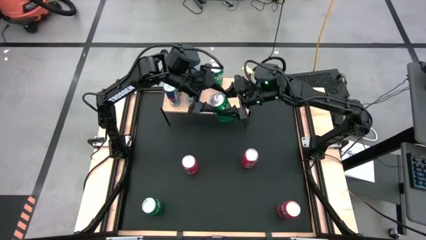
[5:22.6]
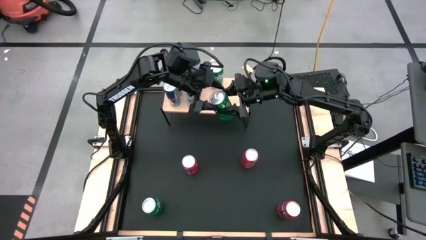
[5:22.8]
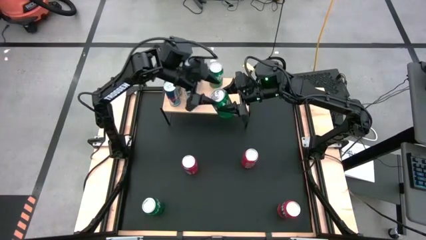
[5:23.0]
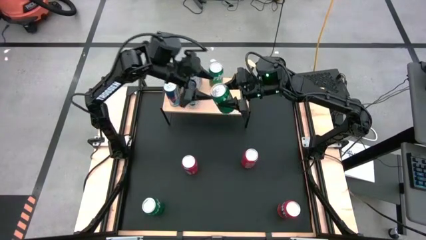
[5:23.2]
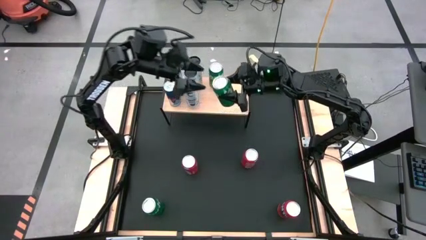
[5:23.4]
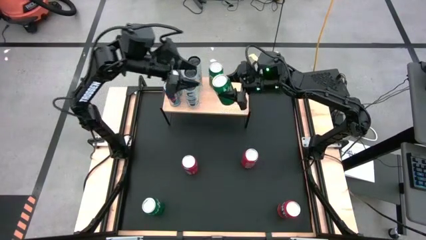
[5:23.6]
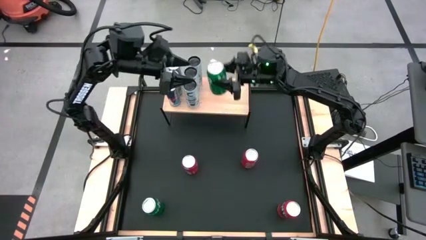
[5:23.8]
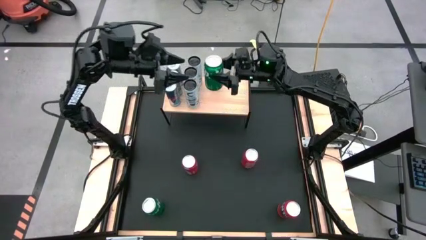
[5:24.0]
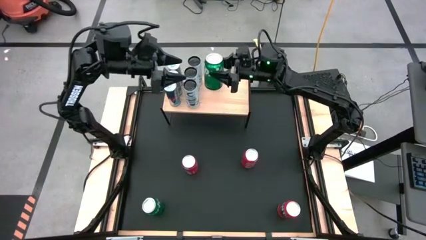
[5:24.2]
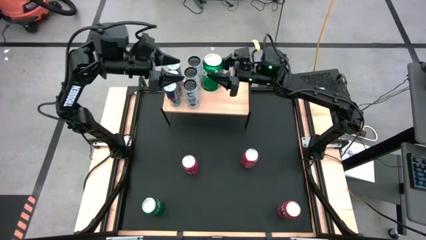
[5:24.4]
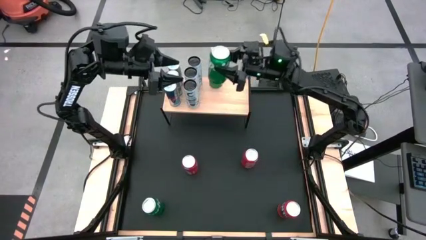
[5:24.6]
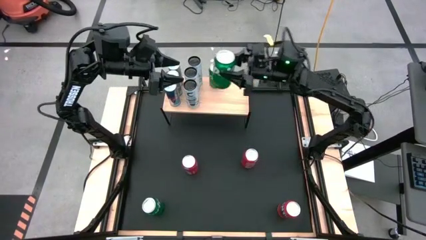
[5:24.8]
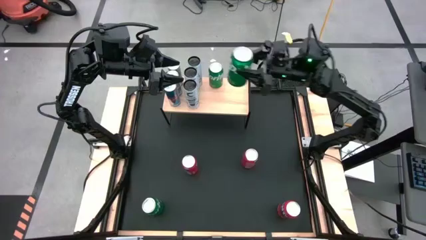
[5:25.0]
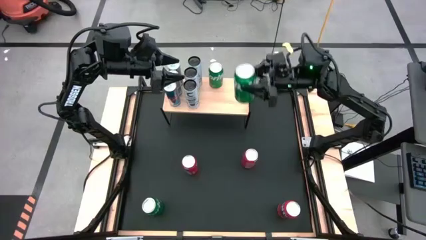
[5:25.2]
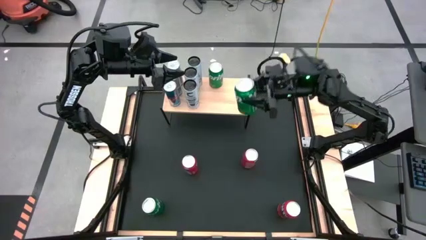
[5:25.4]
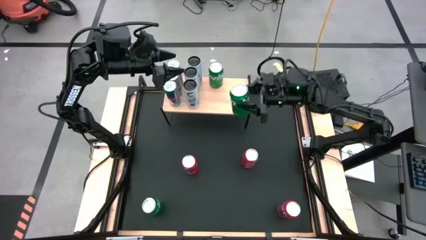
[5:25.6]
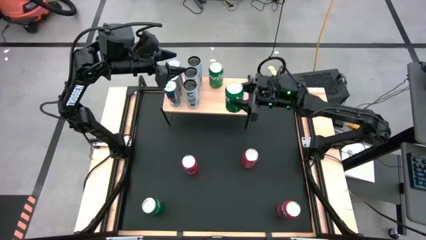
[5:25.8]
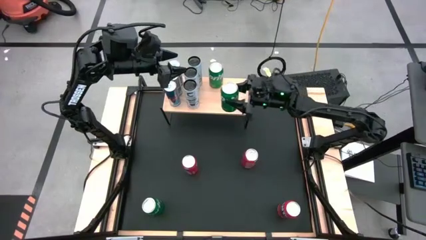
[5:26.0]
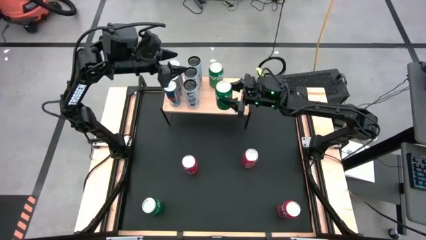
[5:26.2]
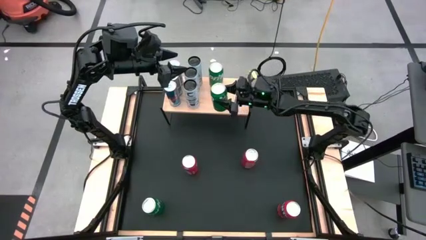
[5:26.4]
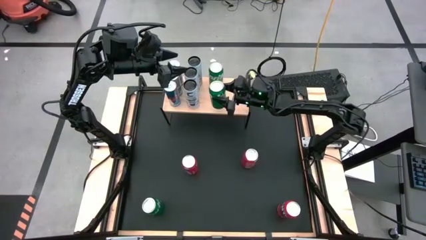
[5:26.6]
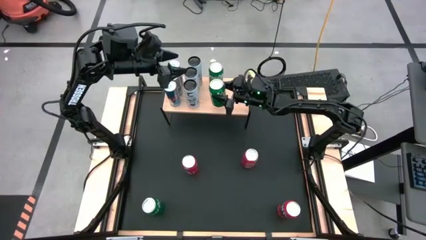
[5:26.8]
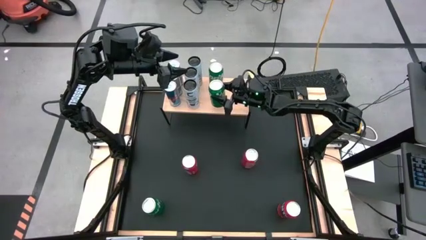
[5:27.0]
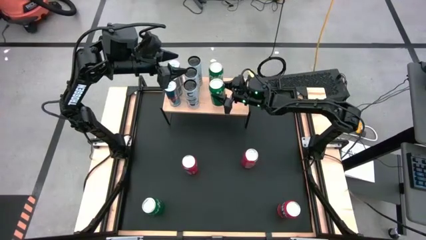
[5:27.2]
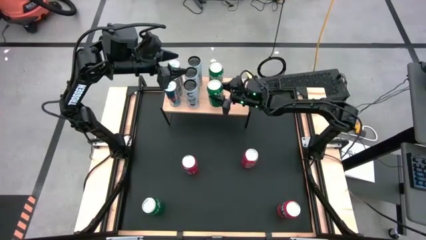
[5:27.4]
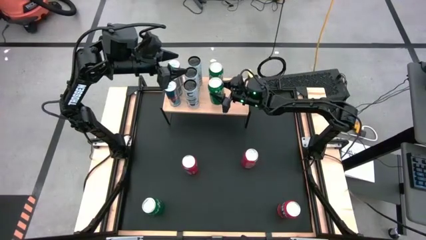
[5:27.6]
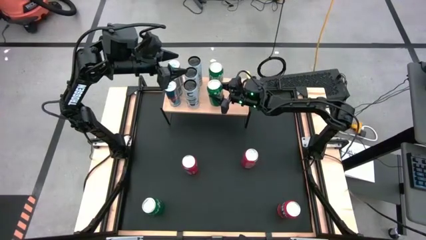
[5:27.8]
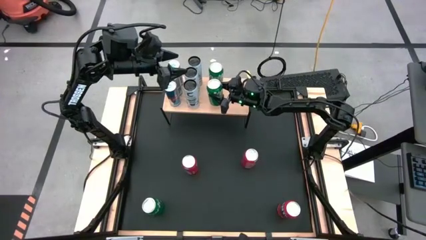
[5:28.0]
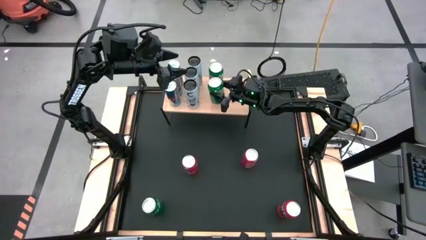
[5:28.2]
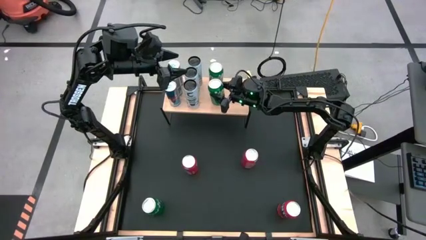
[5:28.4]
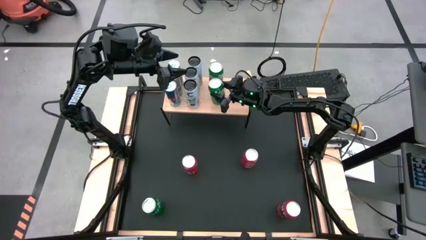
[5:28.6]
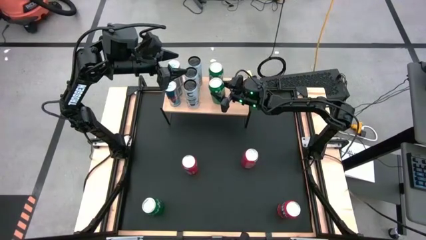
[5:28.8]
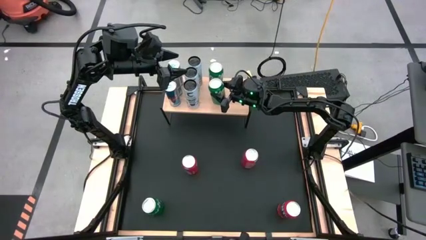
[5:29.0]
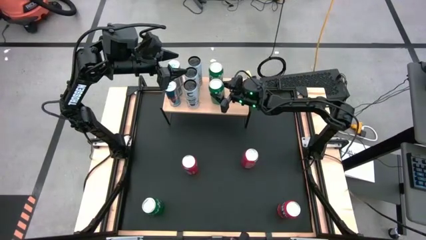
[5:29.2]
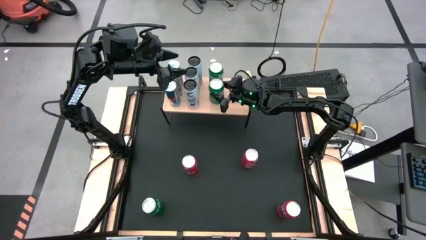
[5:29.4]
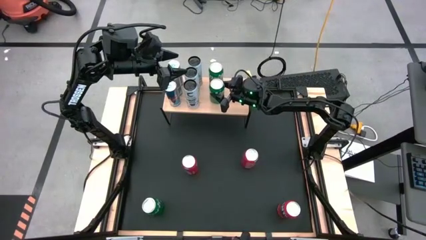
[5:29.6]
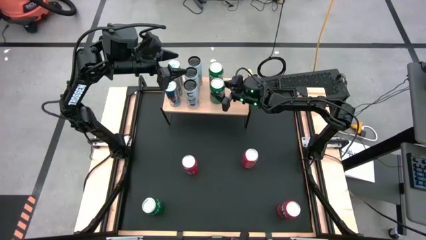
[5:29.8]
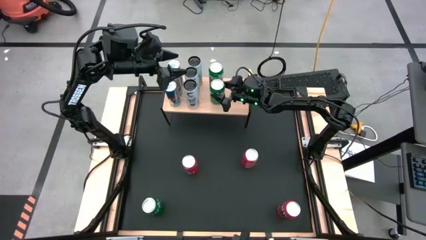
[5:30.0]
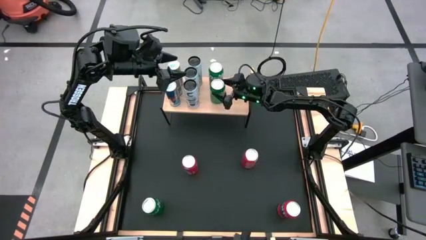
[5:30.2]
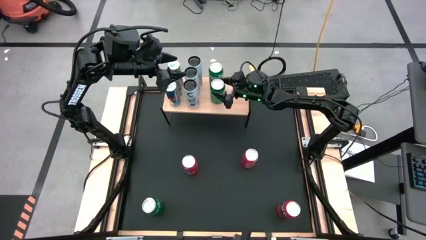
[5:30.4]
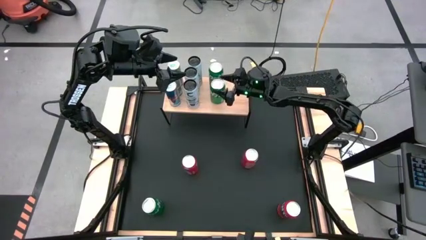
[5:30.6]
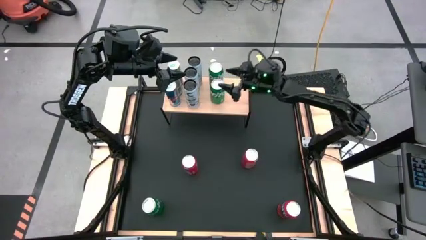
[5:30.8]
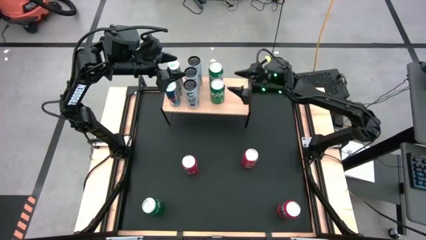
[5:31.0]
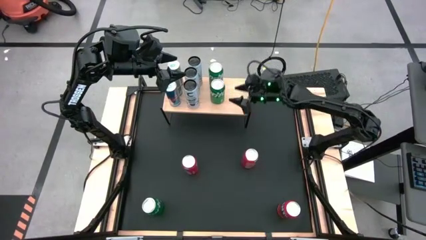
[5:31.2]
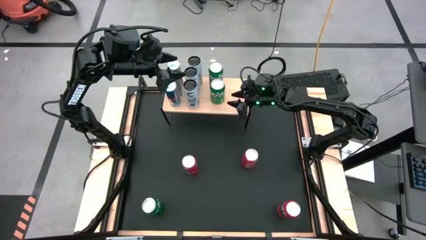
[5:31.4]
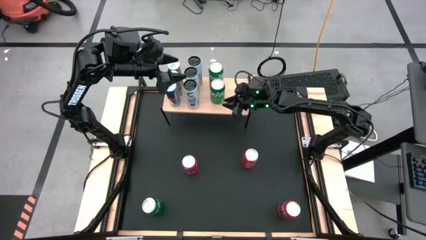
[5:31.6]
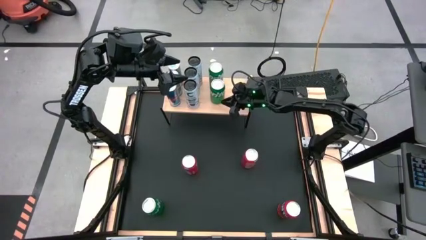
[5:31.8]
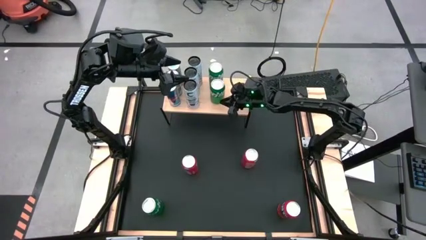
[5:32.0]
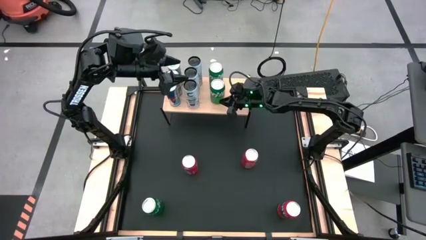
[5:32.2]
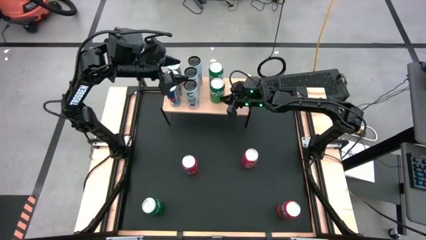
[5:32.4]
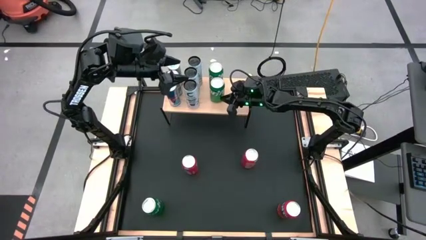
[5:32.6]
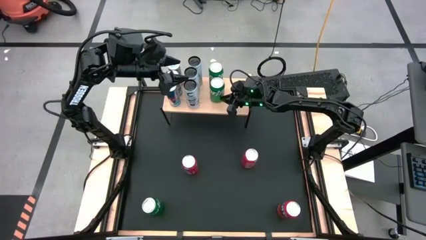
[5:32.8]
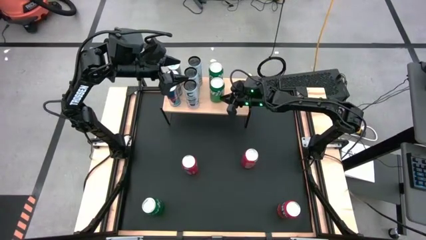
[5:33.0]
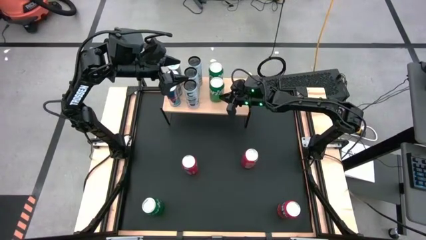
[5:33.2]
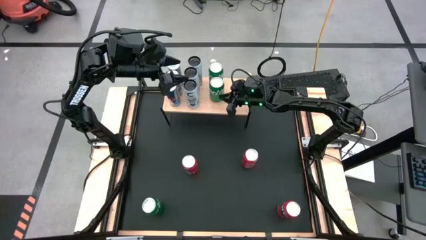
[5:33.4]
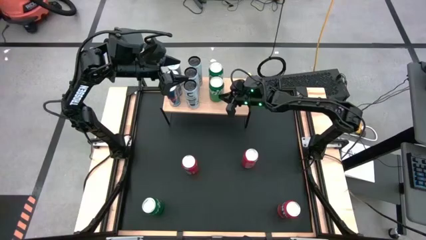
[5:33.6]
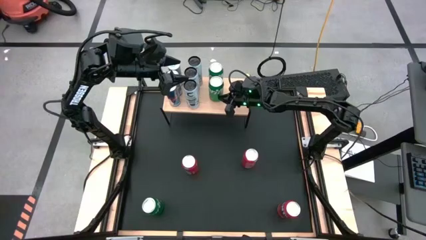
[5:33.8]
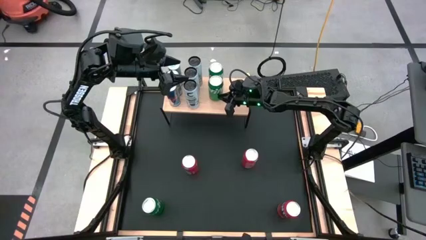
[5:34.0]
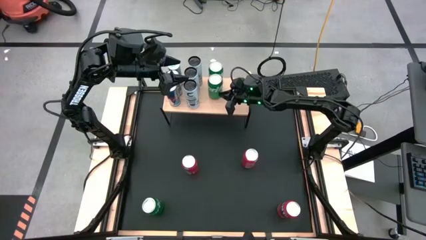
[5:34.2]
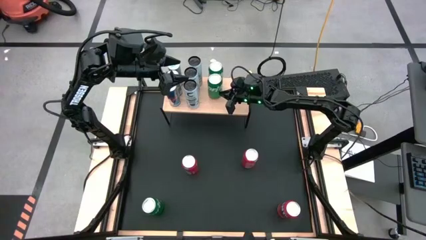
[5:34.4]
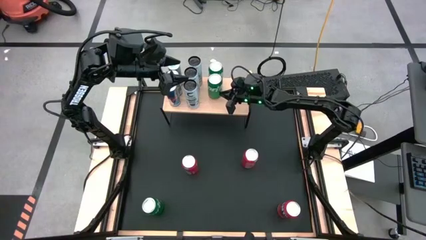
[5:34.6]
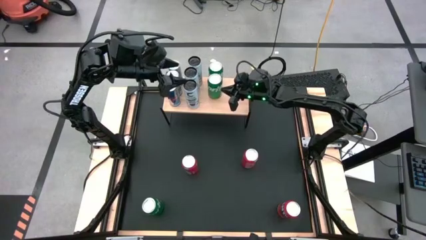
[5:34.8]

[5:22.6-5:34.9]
Task: Place canned beverage on shelf
Put the top green soda can on the shelf

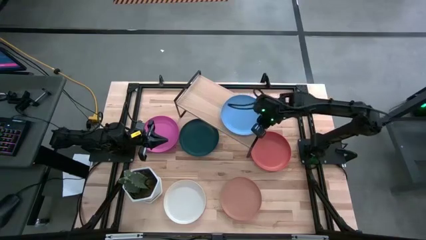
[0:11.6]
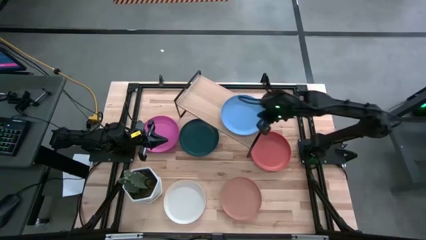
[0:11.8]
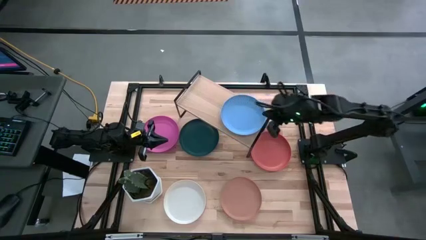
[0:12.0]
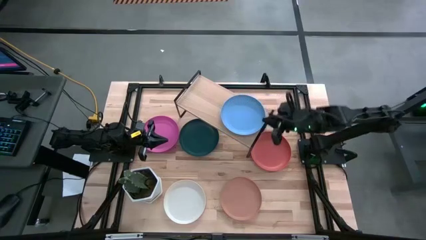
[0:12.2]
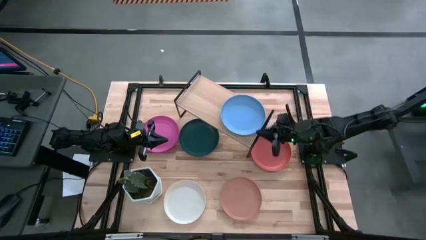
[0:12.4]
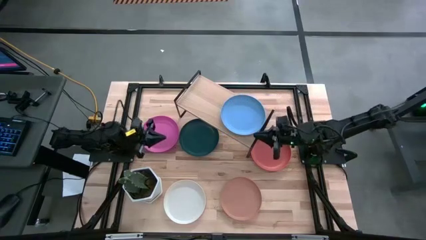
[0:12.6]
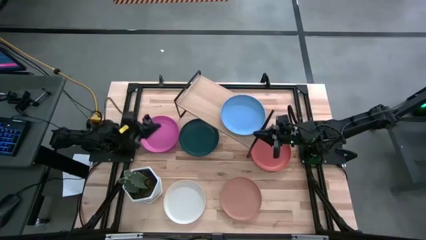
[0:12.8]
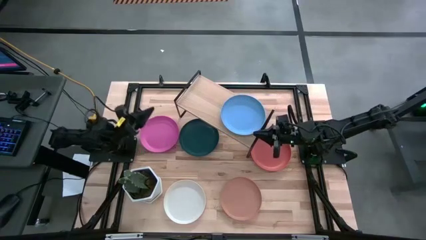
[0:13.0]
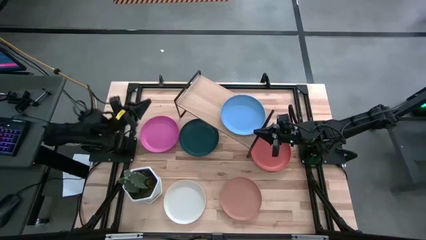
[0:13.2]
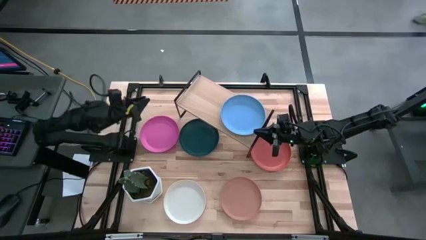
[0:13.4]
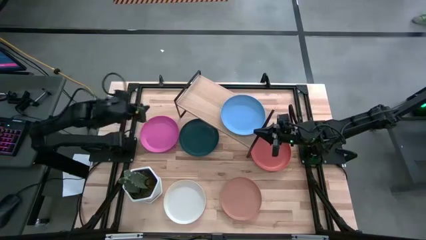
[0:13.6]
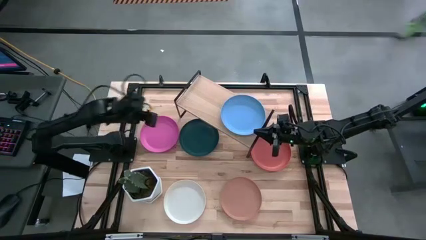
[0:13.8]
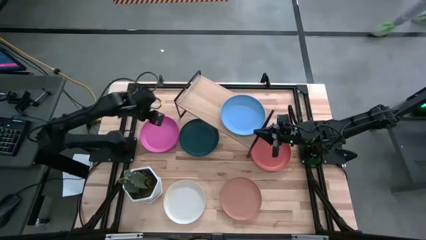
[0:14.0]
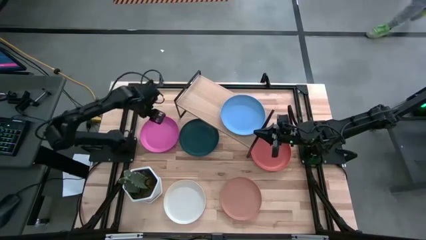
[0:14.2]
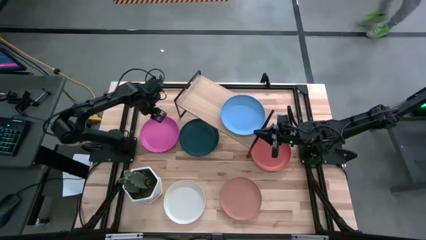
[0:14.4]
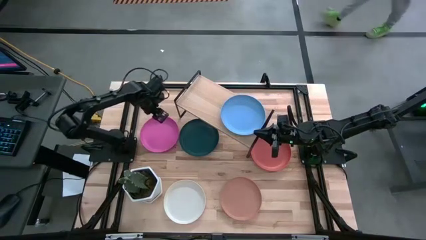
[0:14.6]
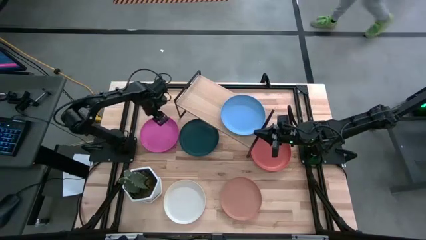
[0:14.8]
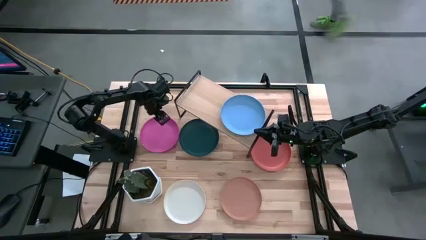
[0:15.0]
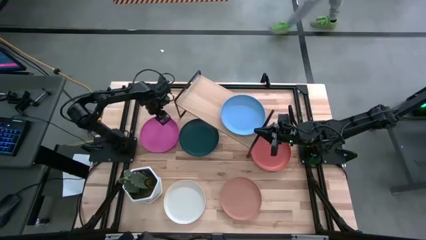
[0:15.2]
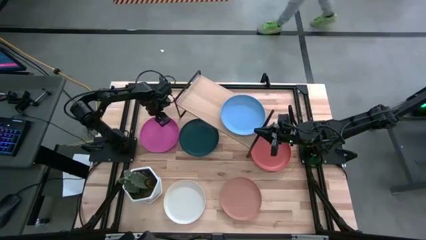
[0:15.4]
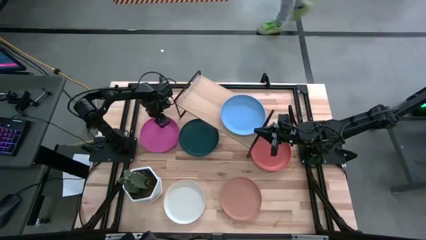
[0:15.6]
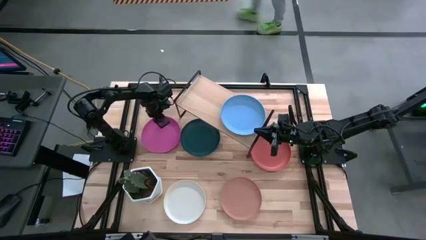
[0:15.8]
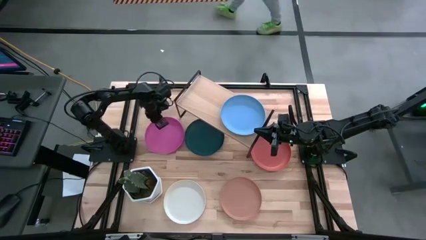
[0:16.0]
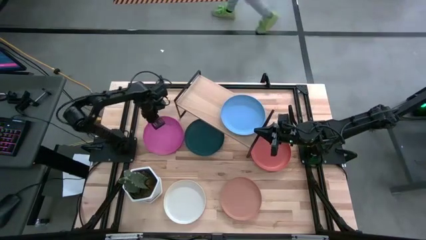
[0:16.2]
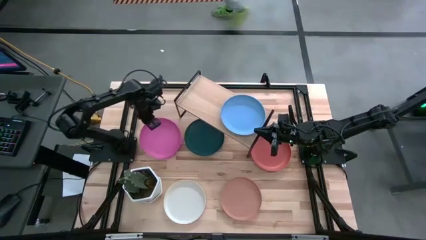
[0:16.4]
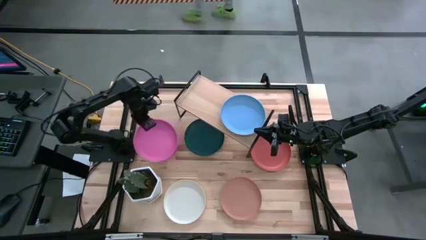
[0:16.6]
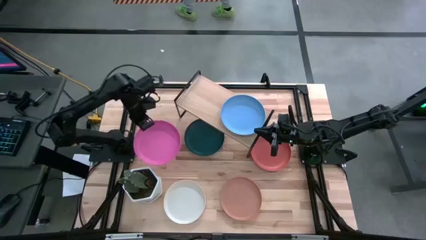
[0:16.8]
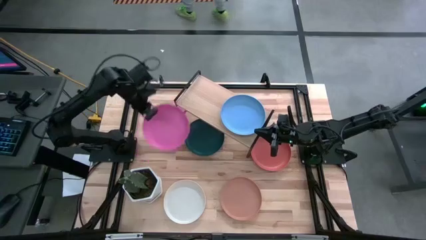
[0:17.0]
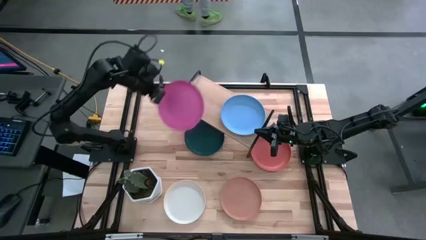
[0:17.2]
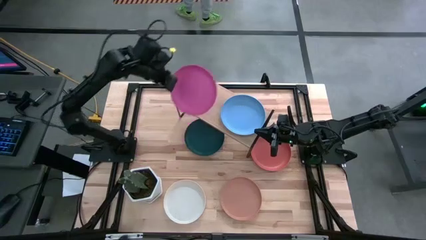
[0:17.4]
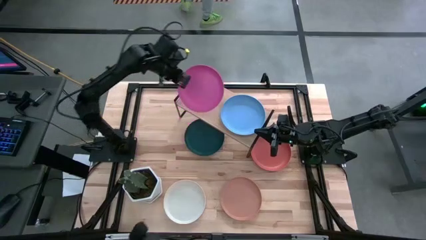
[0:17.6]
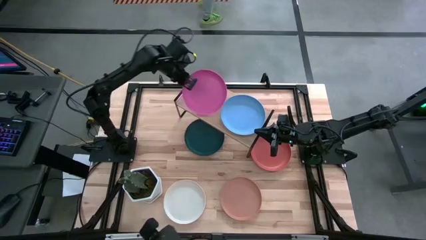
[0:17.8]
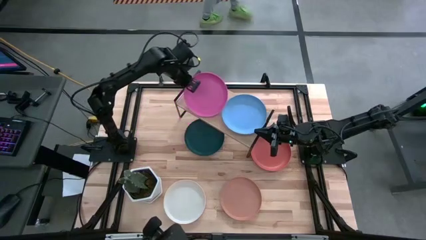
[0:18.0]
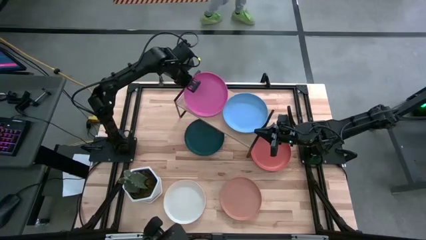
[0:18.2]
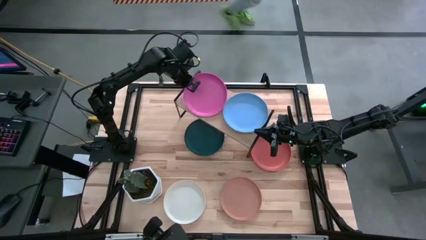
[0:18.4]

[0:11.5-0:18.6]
Task: Place and stack plates onto a shelf
Put the pink plate on the shelf
